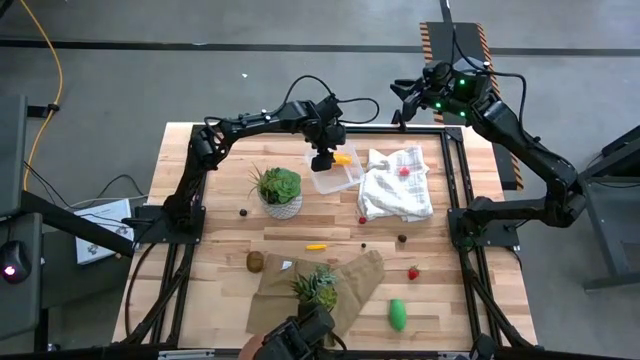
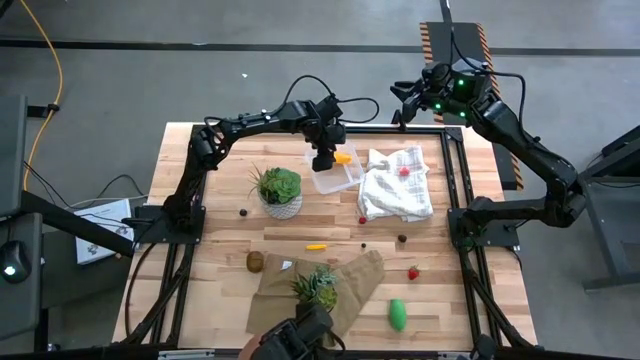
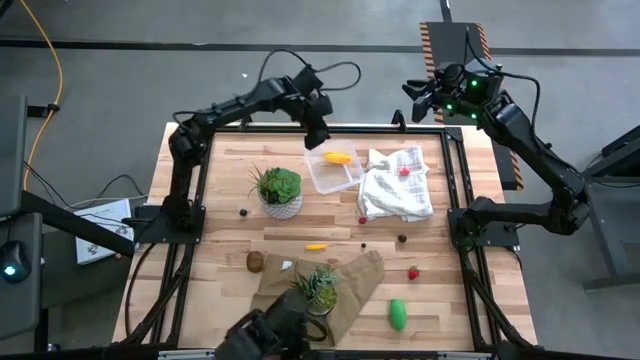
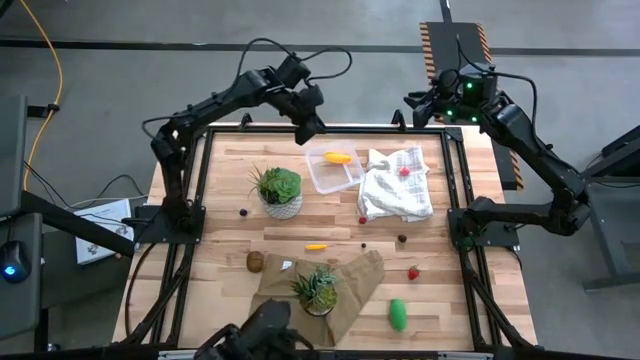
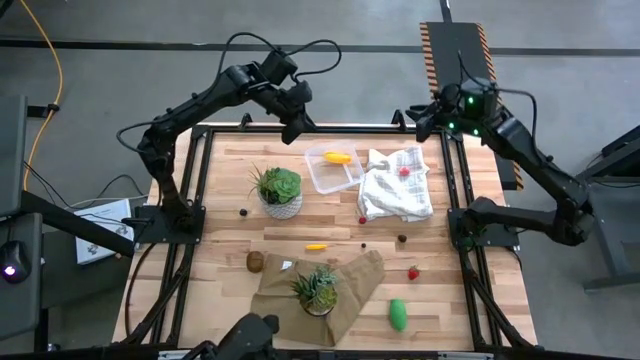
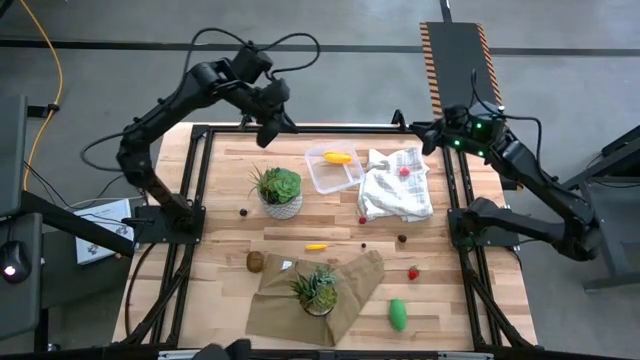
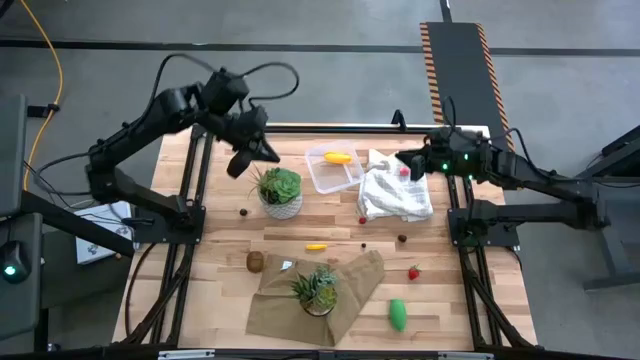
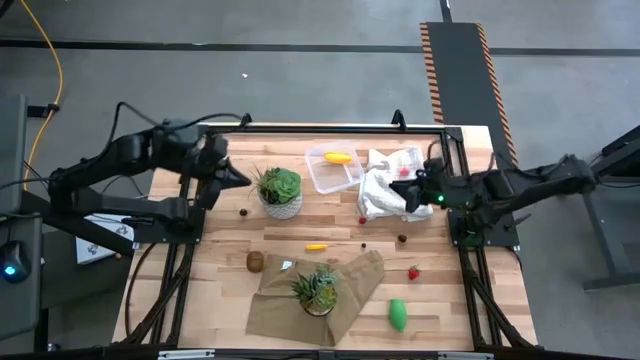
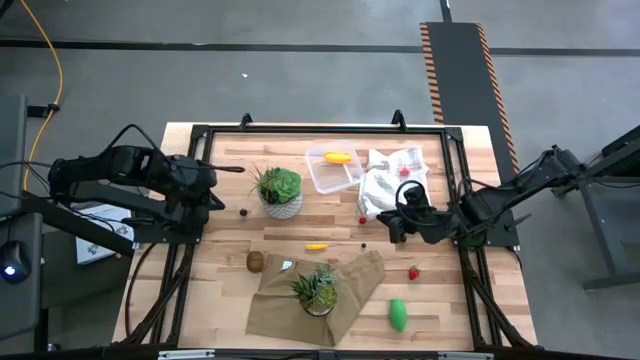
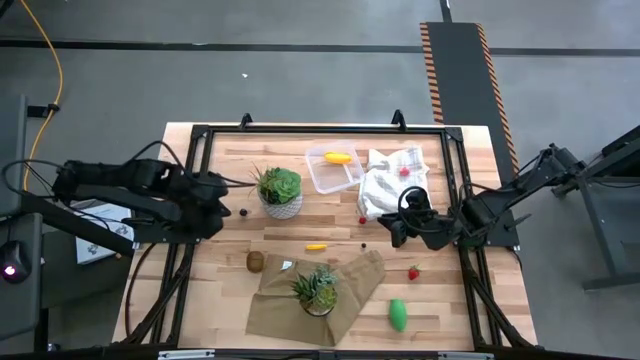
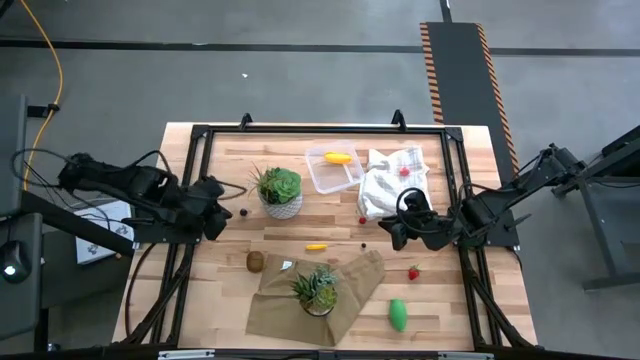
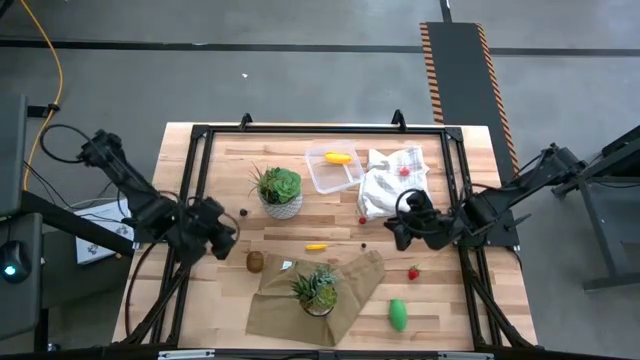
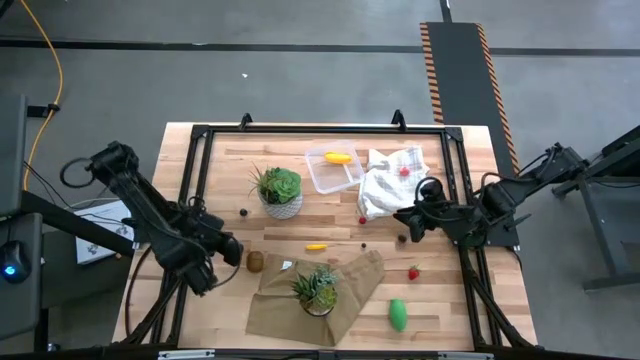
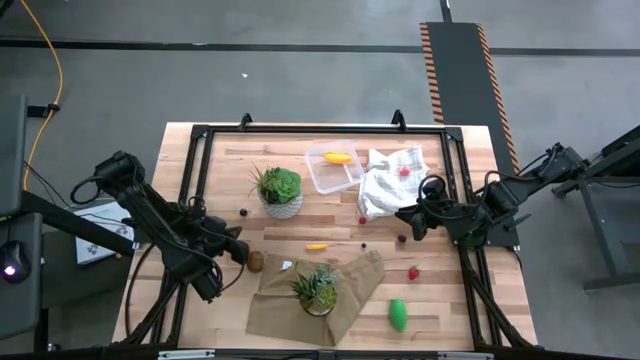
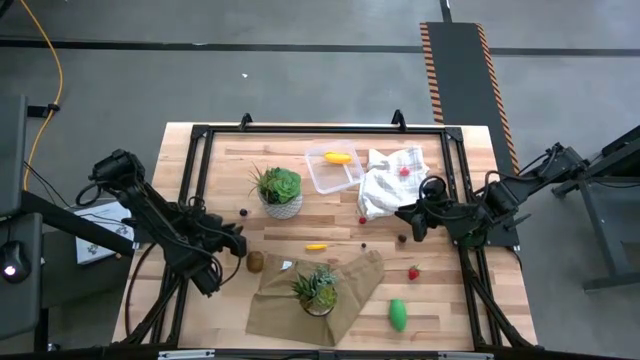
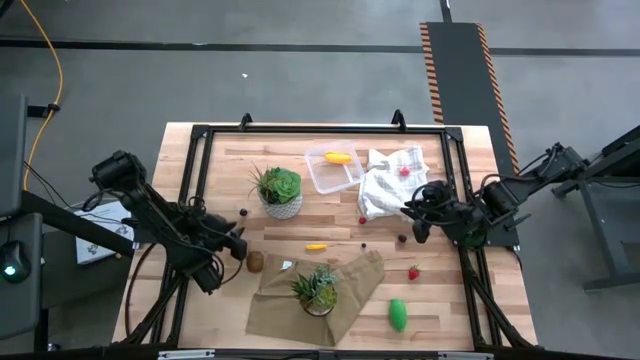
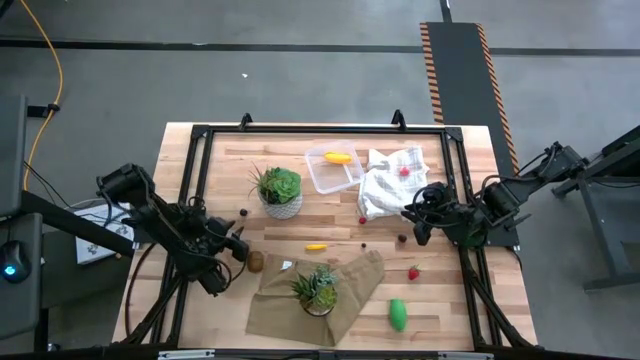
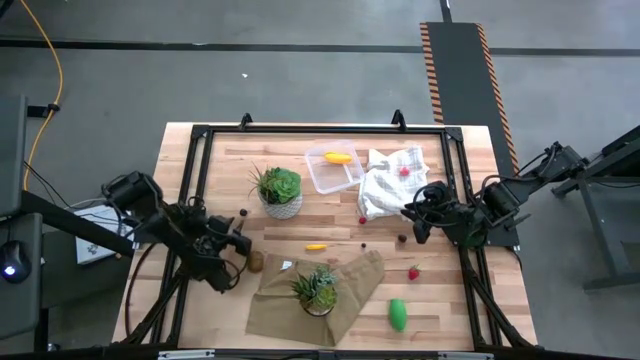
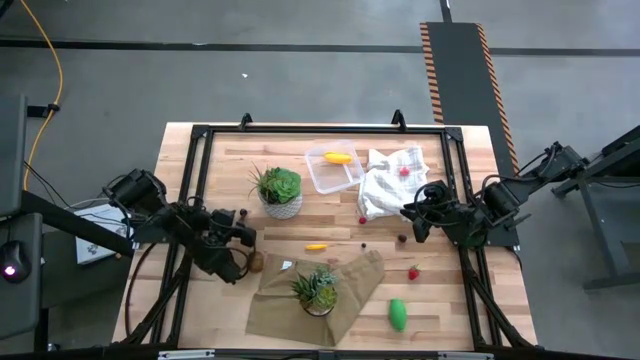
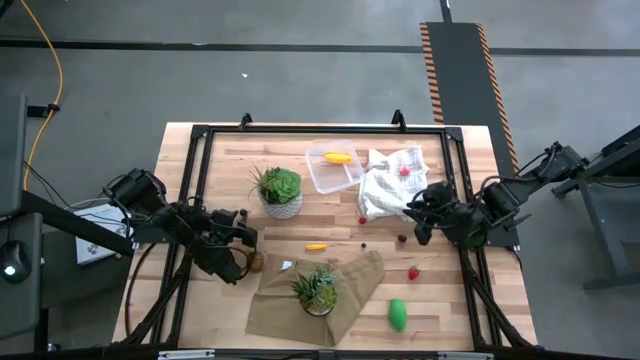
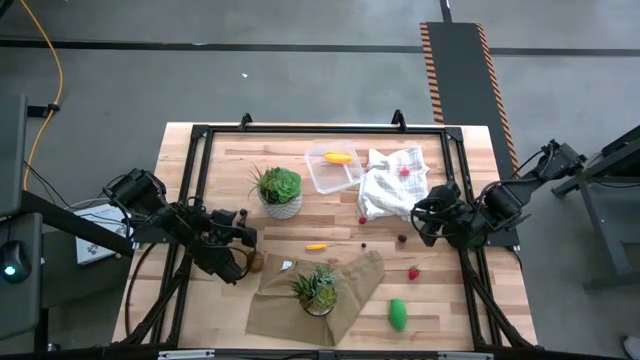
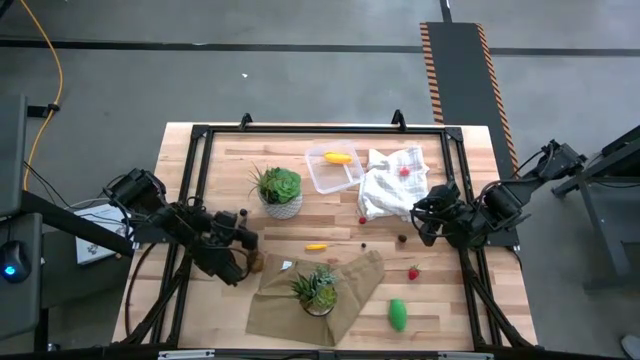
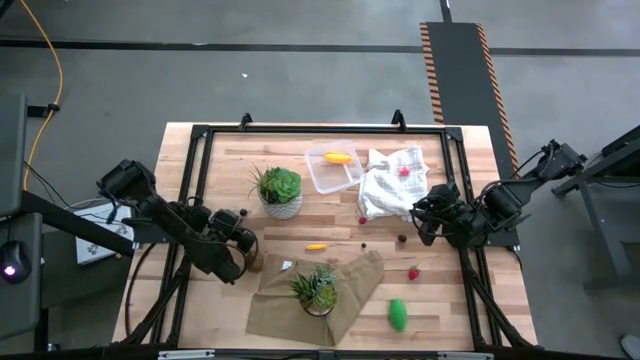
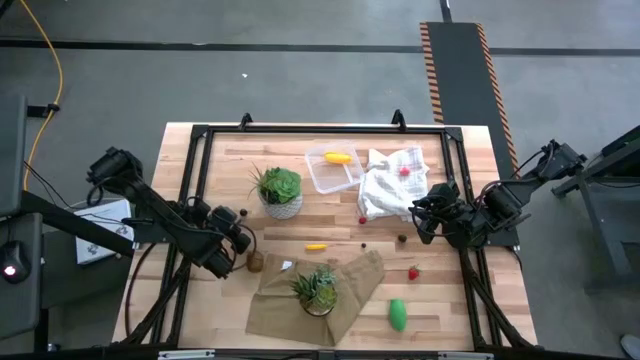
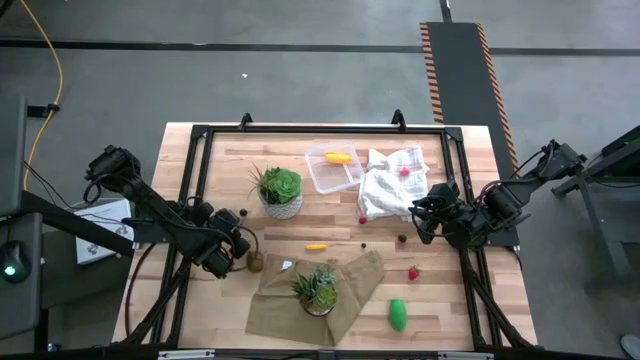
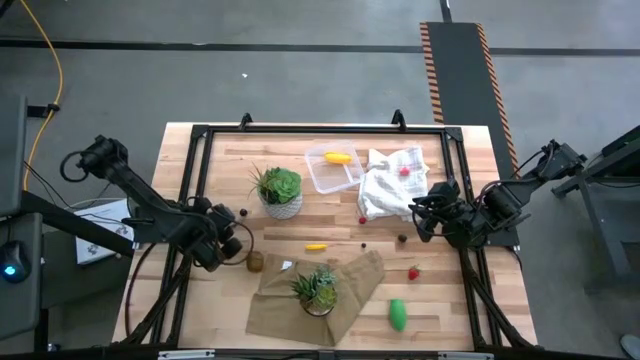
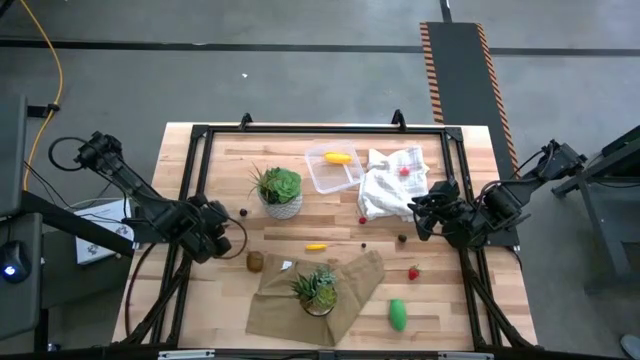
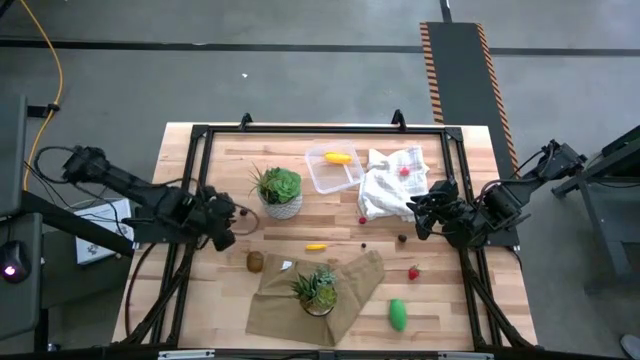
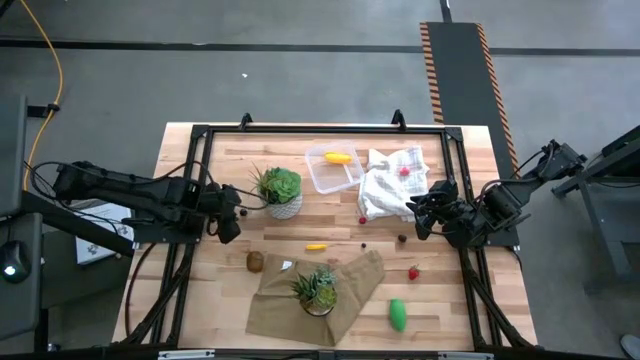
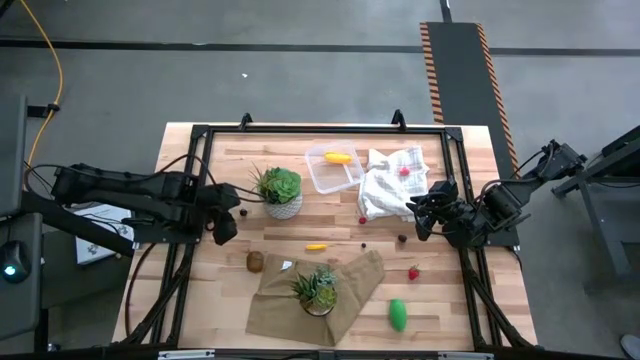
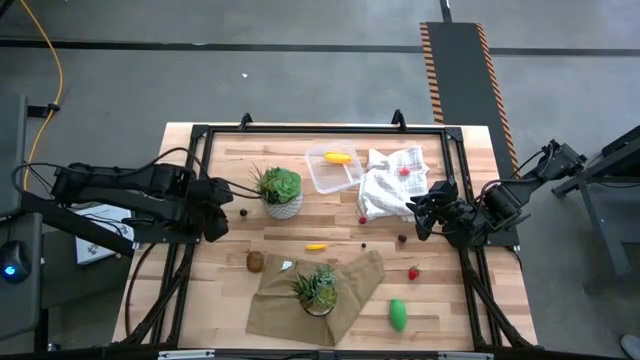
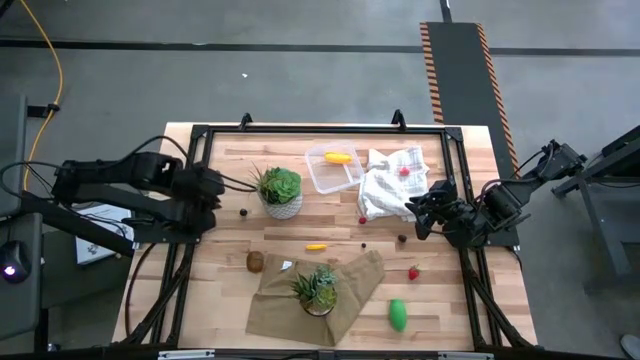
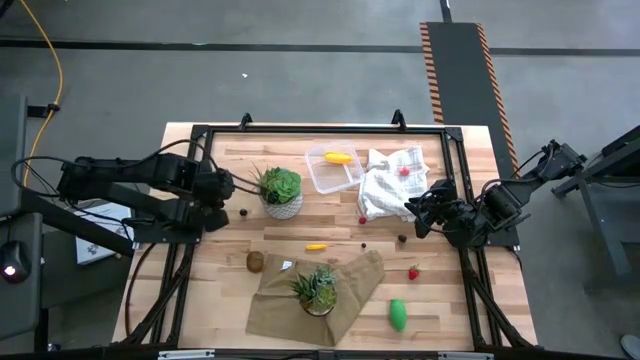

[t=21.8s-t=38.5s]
Task: Pick and placing Produce into tupperware
Put the black cherry into the transparent bin
